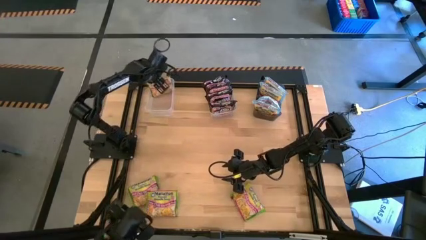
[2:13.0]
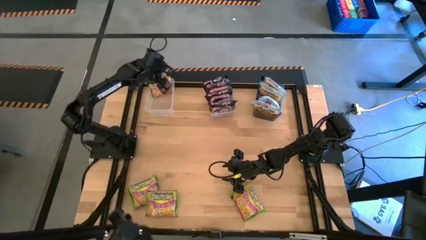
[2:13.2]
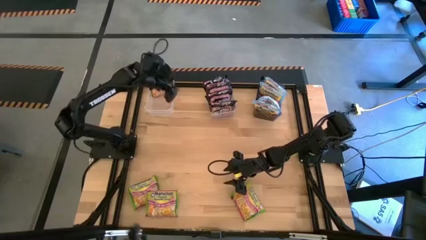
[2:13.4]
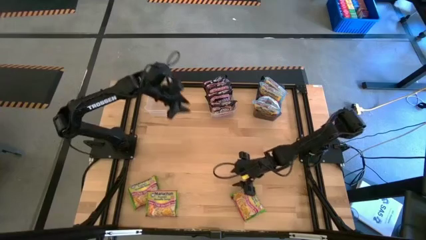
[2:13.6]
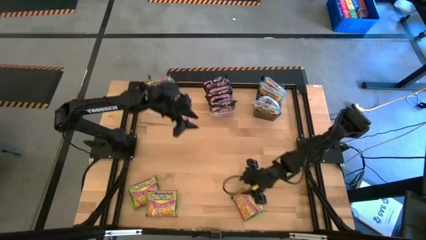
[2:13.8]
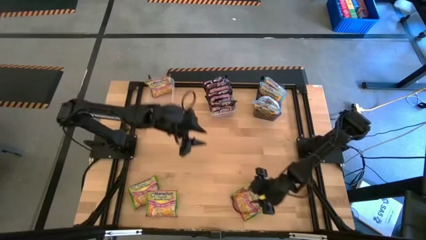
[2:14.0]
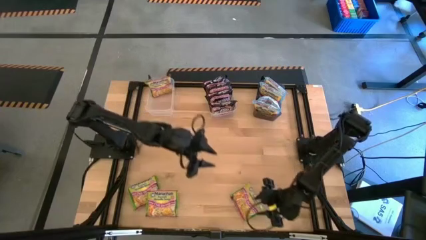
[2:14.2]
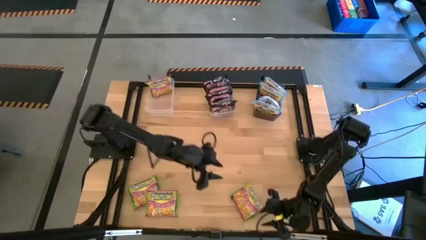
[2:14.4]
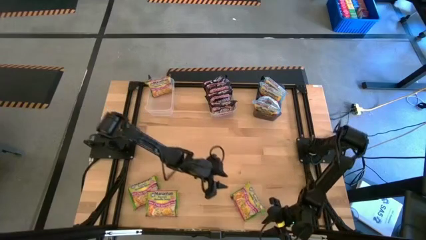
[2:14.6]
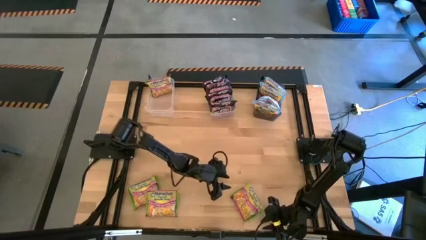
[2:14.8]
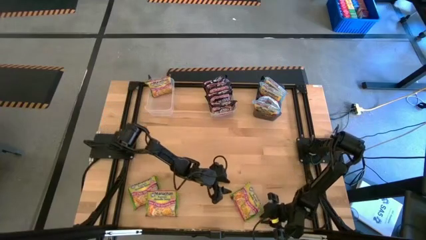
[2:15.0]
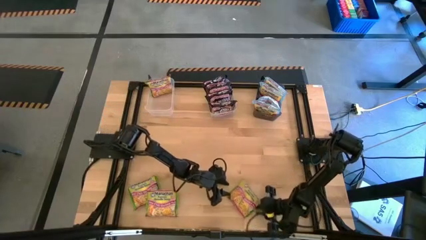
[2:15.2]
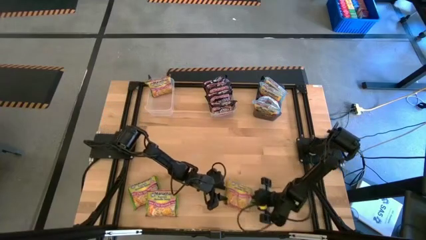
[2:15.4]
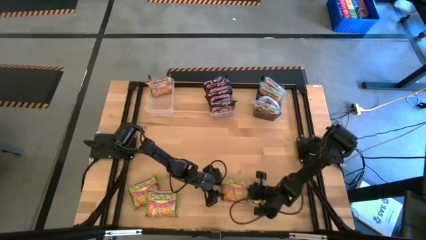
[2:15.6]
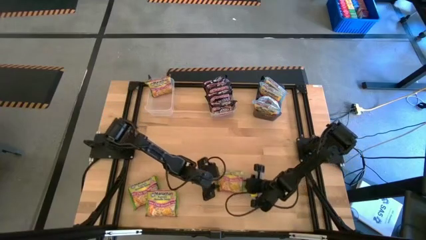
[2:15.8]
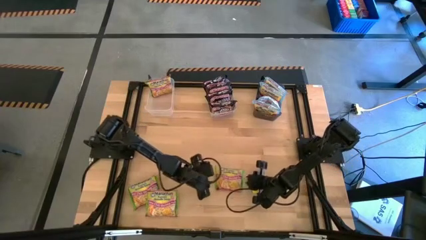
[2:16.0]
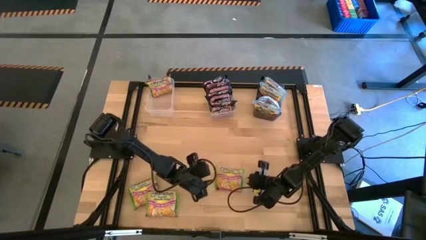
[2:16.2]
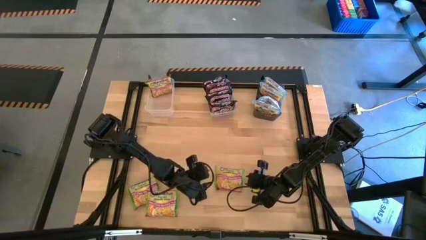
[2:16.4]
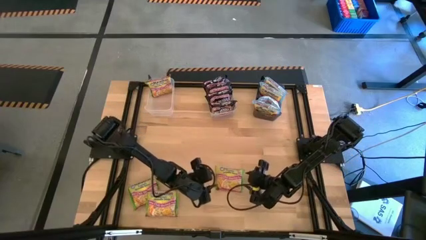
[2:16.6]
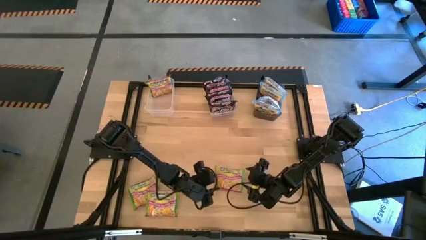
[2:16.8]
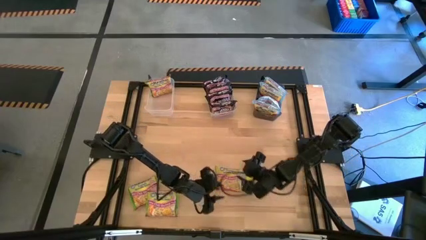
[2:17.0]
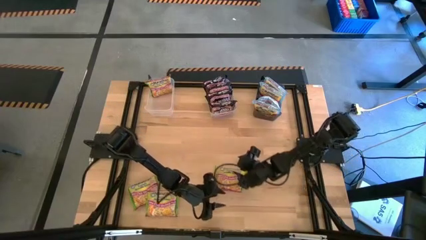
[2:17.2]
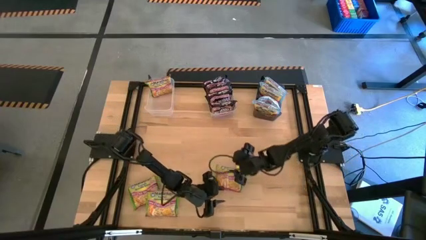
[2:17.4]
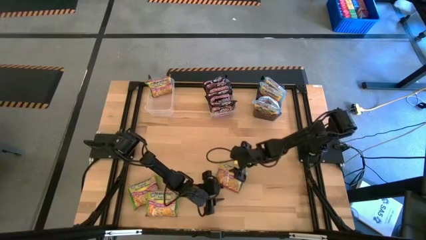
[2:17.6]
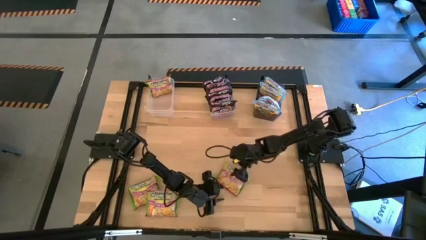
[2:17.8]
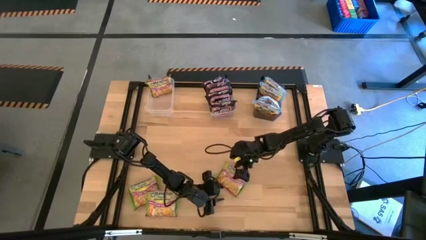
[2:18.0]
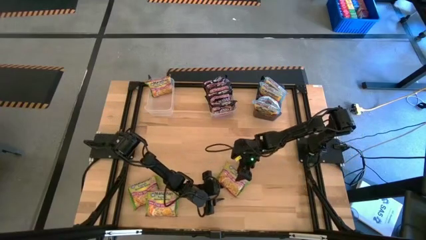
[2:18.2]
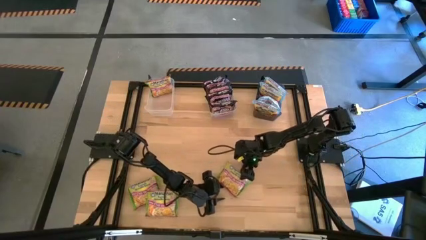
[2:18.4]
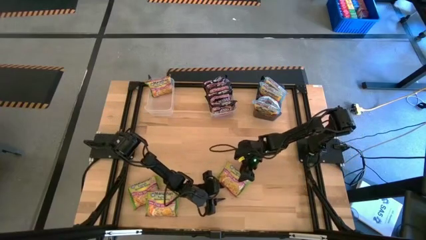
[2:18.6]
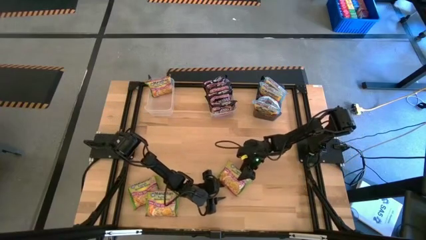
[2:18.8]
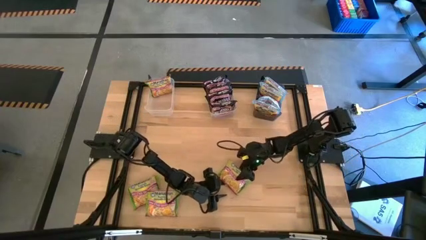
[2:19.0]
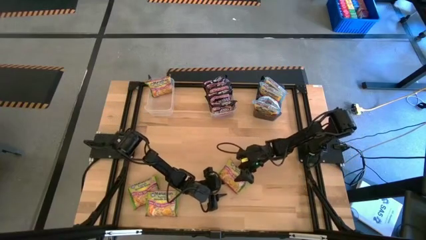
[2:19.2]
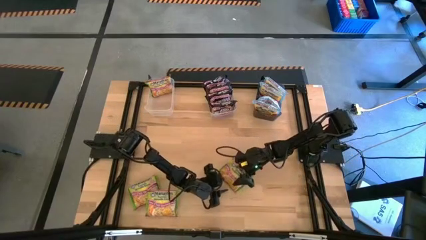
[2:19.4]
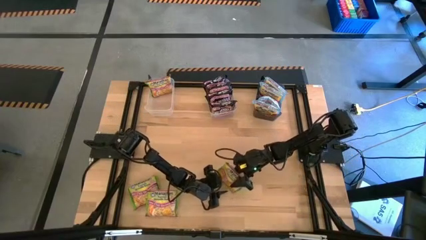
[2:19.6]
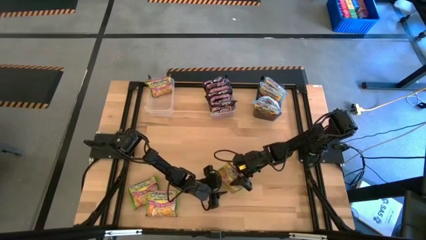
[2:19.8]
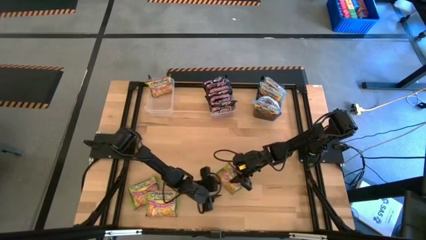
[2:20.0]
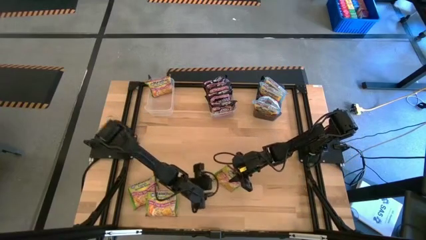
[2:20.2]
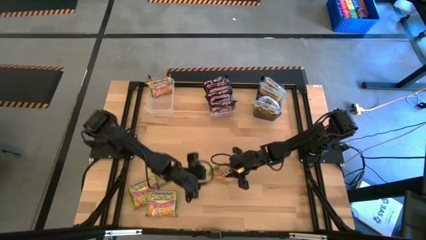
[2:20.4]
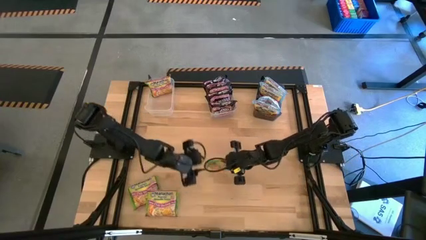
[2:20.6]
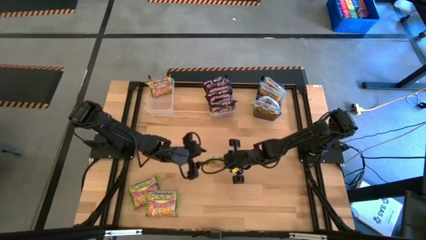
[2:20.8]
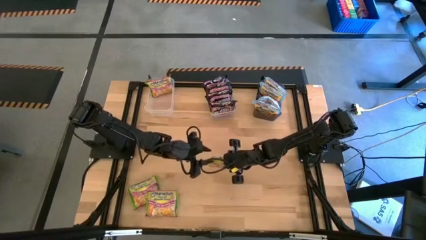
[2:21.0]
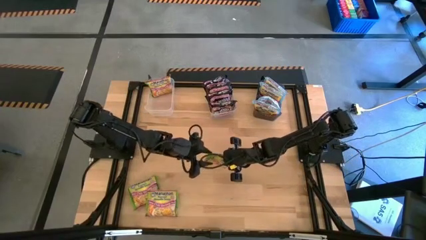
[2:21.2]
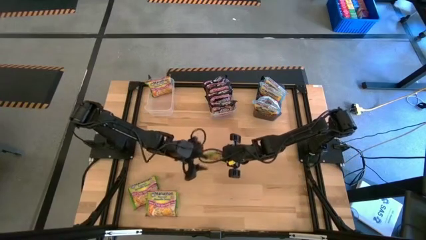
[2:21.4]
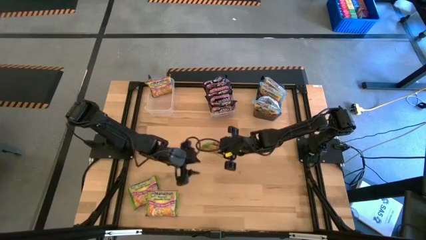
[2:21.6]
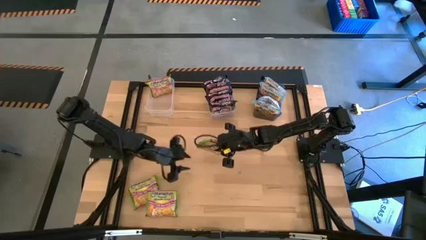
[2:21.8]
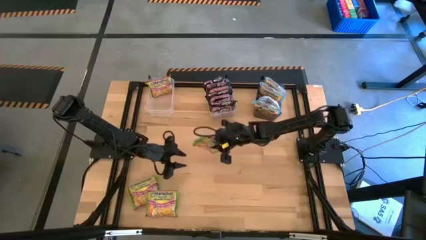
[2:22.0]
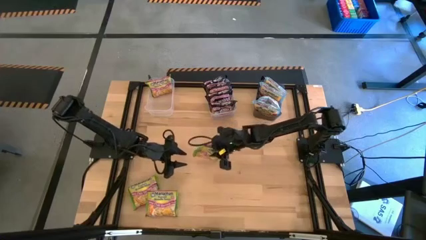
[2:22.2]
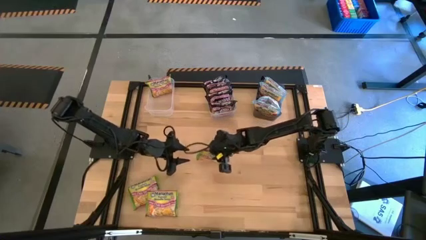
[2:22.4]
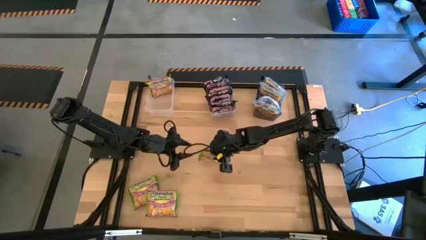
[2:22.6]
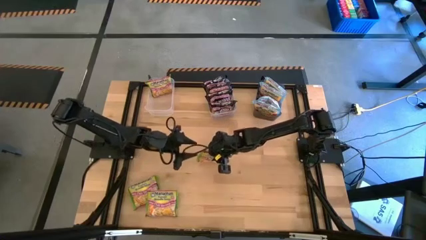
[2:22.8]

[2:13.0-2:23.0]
Task: Sort Maruchan noodles
Put the green noodle pack into the left transparent bin
